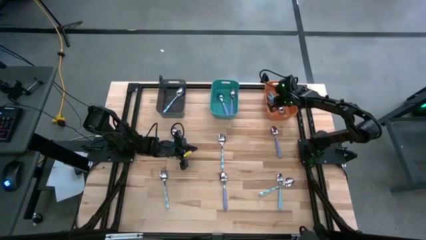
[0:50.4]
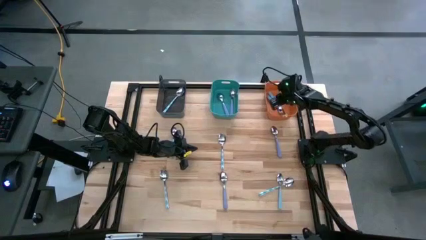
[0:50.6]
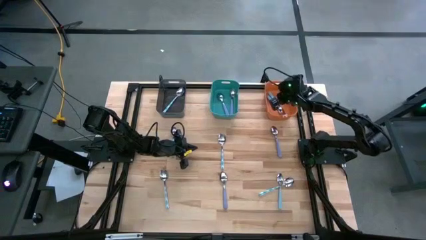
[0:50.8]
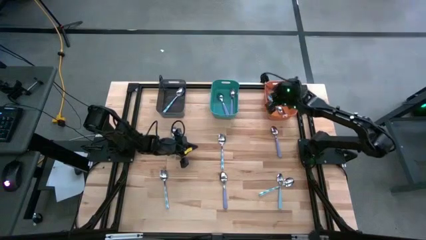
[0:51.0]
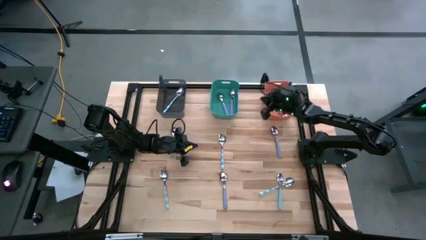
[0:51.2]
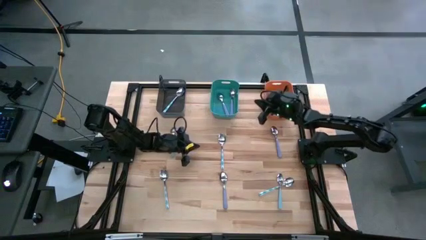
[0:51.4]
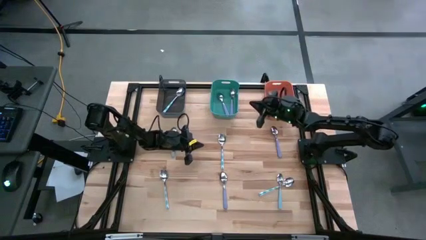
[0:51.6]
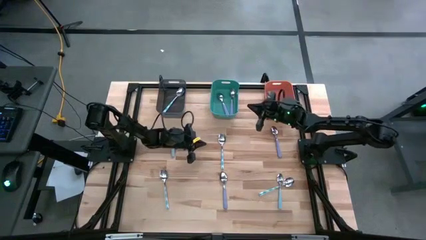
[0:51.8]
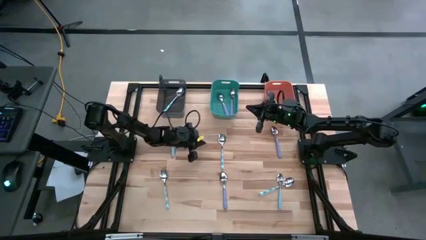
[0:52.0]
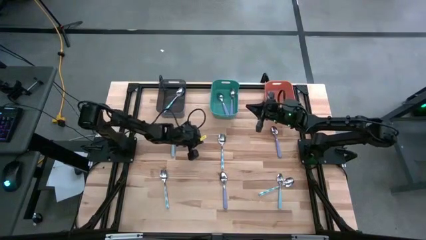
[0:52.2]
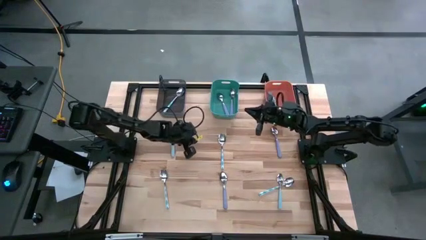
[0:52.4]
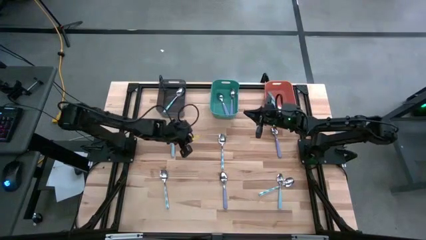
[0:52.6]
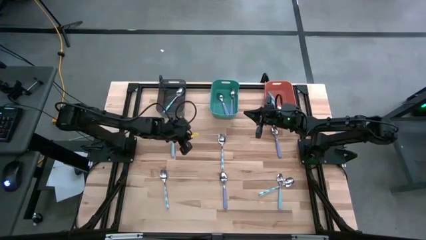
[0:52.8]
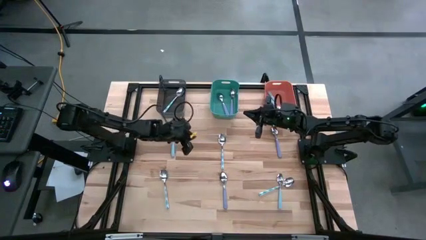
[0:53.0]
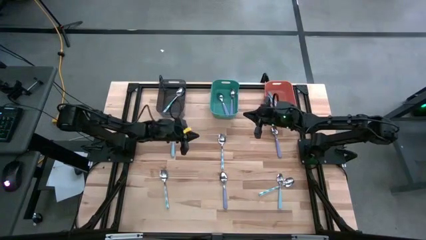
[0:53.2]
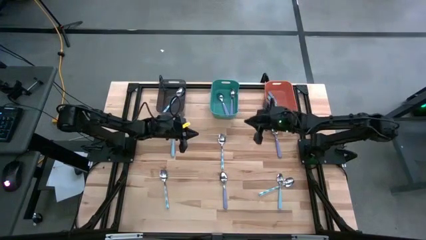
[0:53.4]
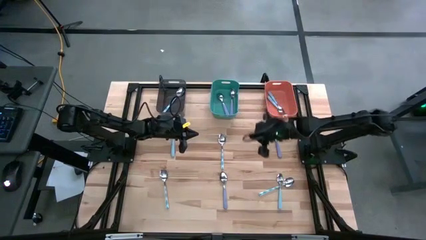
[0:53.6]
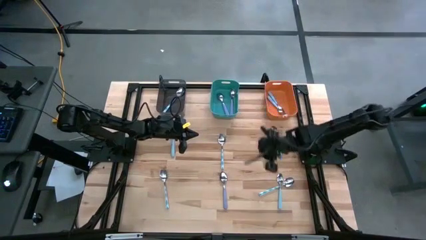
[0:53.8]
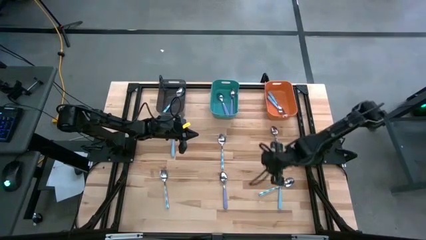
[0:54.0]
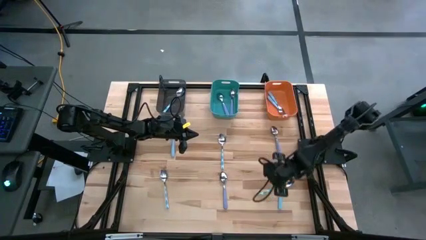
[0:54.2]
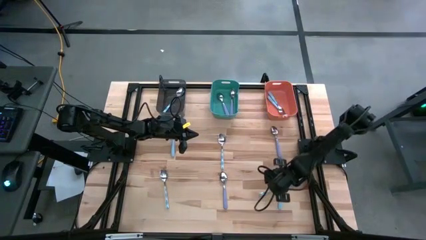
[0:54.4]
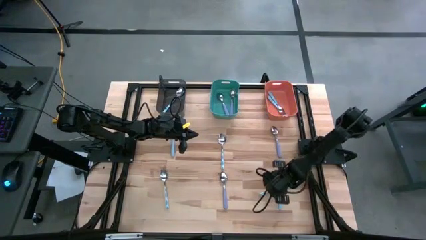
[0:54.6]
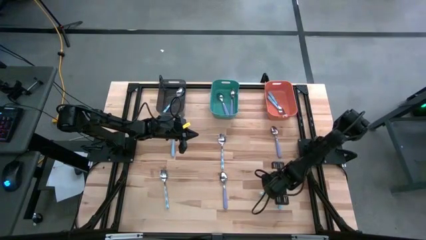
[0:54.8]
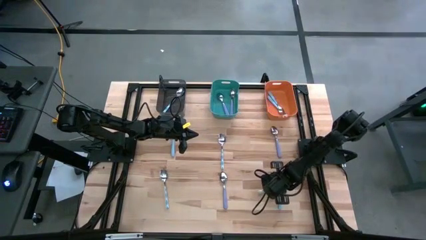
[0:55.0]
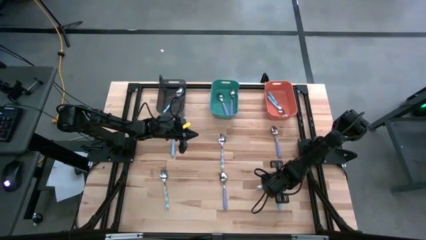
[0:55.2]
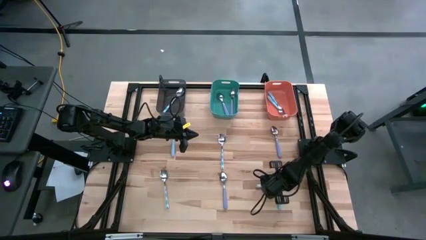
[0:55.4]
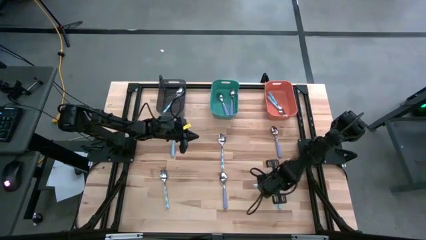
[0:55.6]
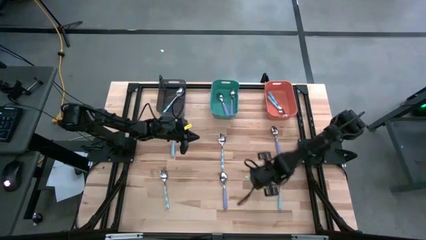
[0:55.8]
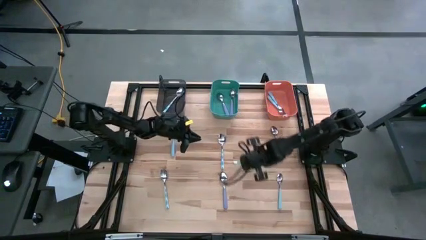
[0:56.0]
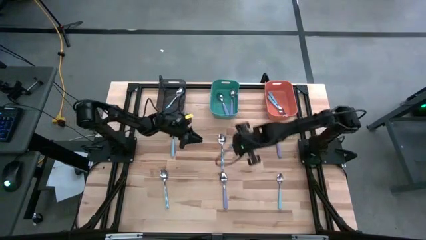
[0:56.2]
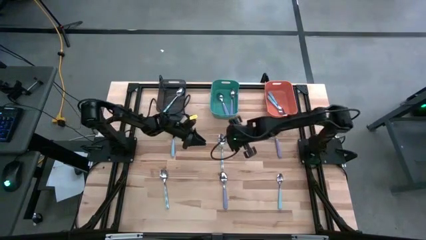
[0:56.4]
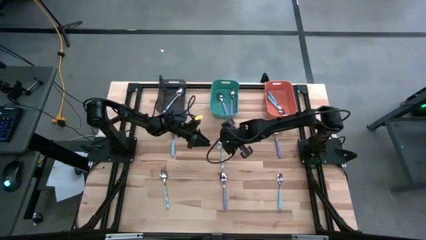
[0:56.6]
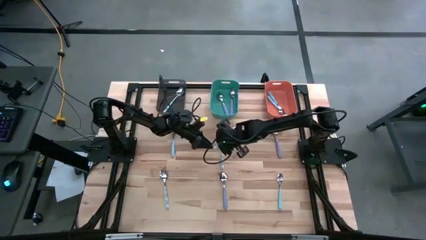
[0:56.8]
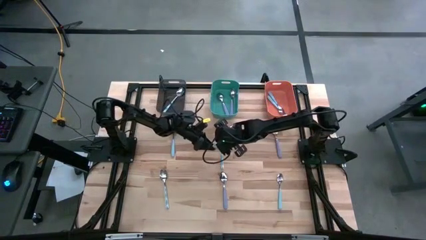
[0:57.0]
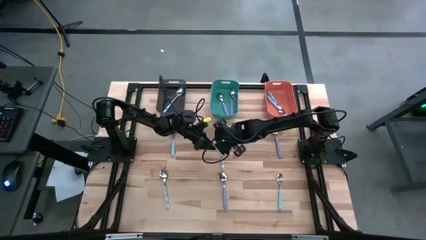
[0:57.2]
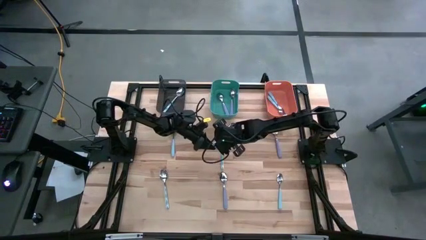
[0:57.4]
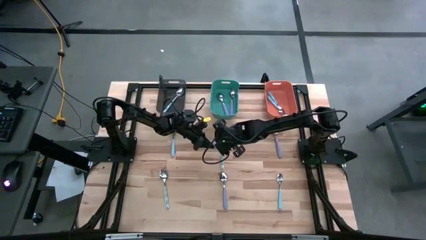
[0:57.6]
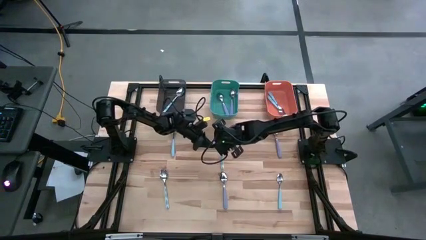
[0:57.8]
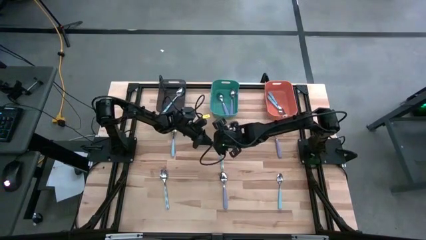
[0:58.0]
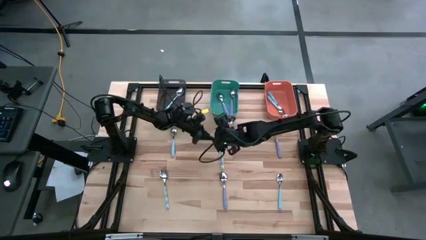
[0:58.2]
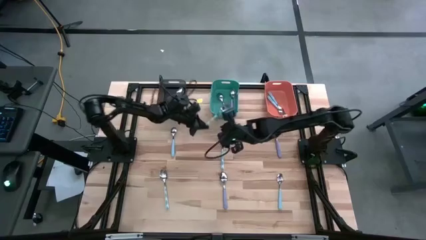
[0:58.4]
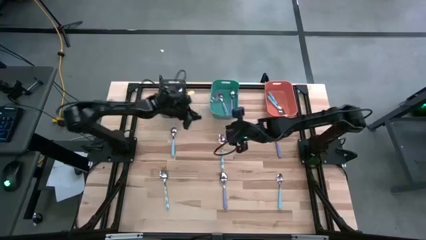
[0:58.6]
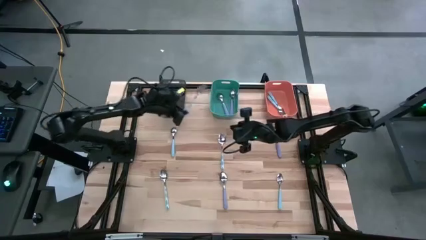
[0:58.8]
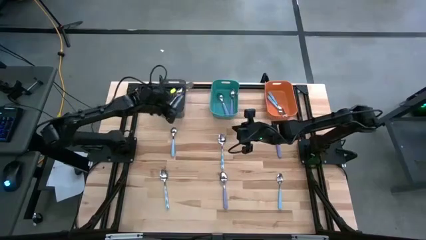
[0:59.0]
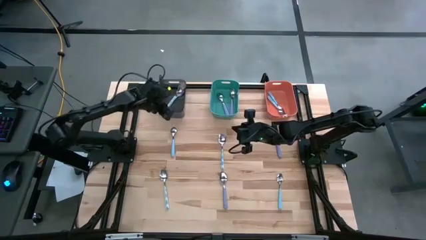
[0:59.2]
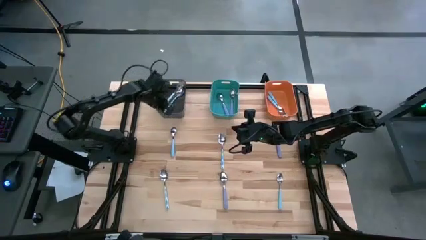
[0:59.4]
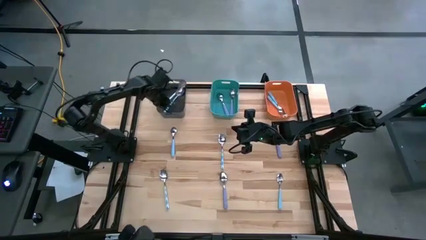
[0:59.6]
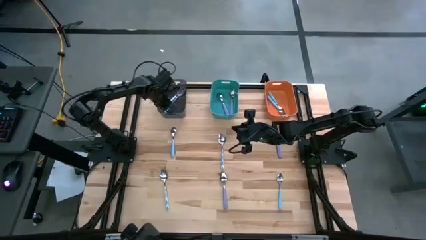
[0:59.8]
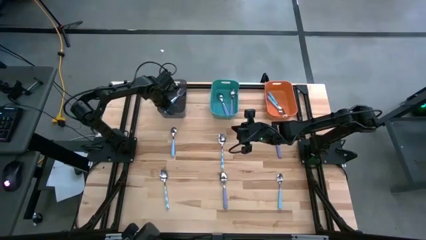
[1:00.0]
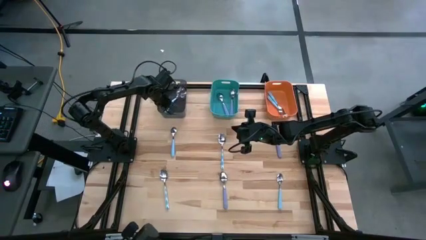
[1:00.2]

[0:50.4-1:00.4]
Task: Sort silverware by color (type)
Put the bottom right white spoon into the black bin

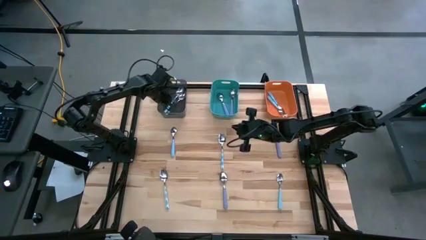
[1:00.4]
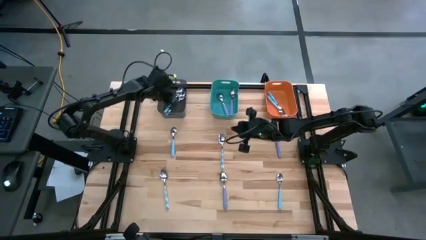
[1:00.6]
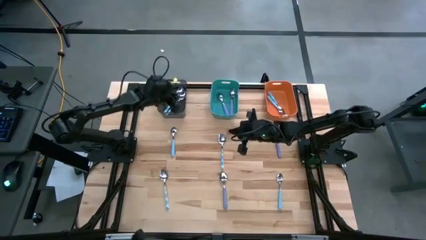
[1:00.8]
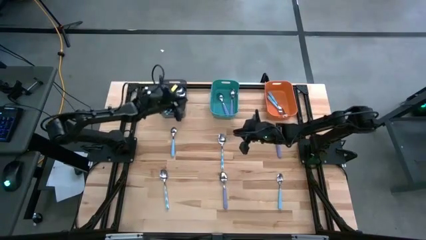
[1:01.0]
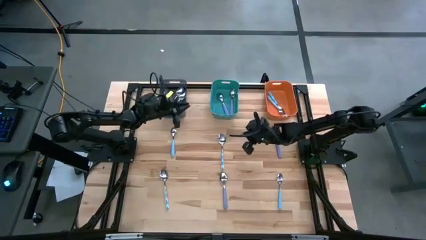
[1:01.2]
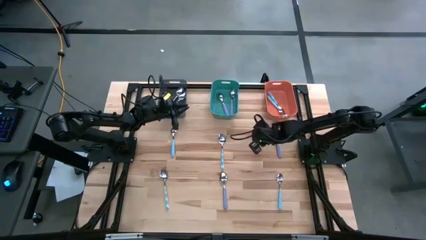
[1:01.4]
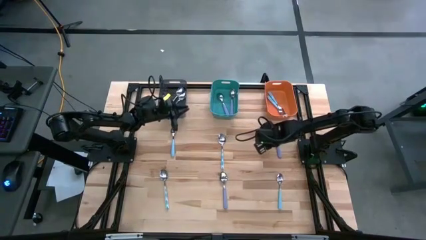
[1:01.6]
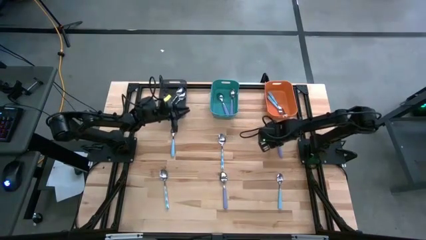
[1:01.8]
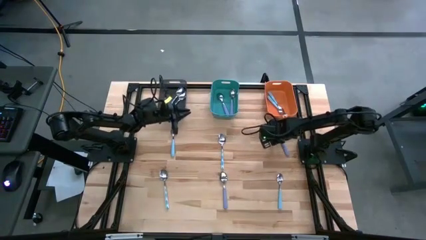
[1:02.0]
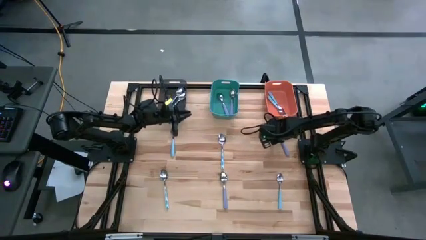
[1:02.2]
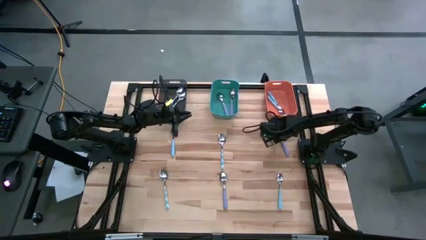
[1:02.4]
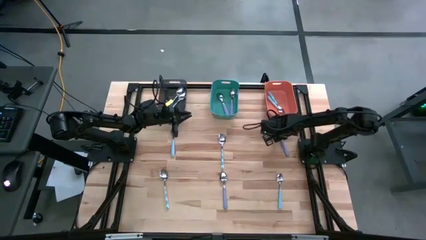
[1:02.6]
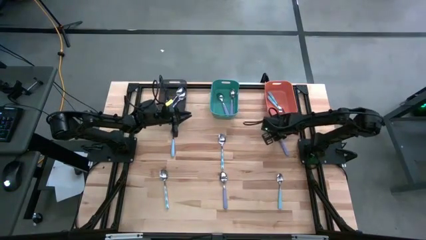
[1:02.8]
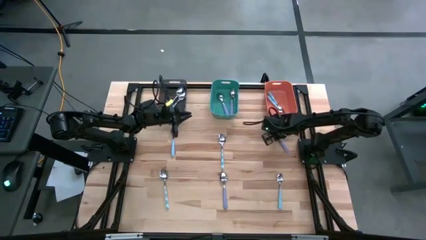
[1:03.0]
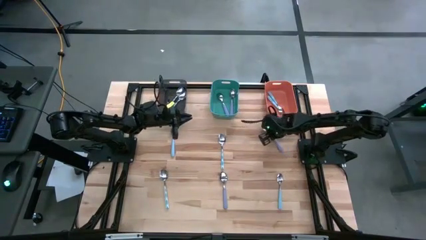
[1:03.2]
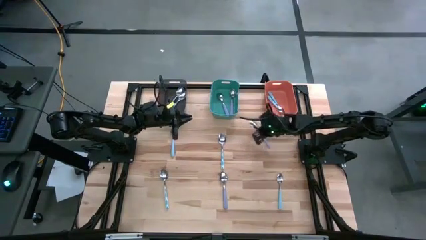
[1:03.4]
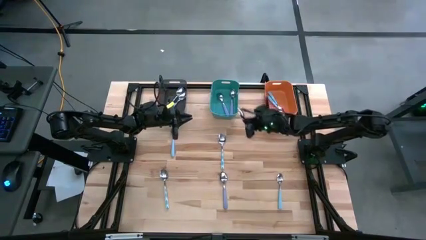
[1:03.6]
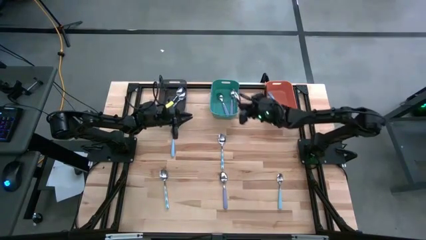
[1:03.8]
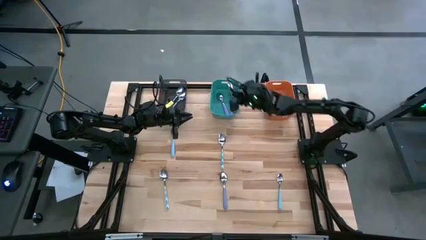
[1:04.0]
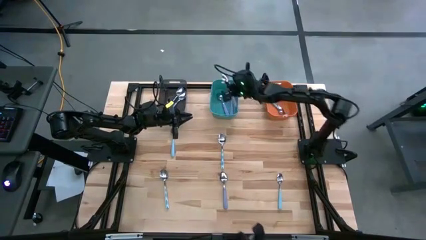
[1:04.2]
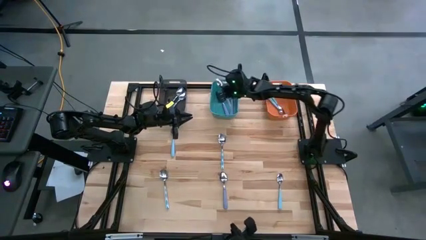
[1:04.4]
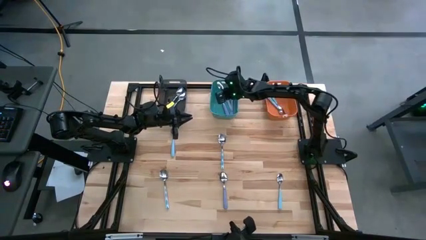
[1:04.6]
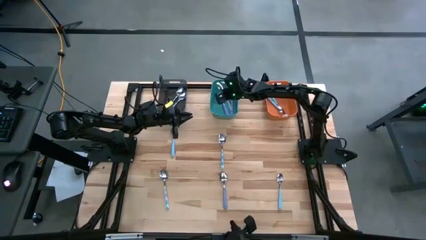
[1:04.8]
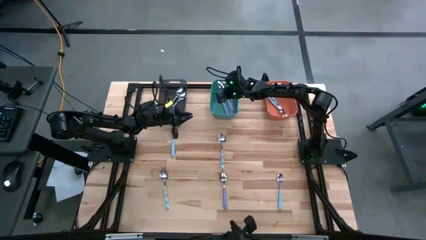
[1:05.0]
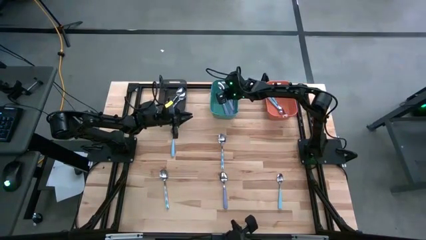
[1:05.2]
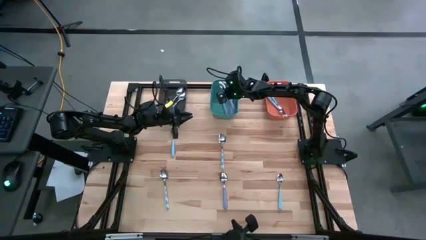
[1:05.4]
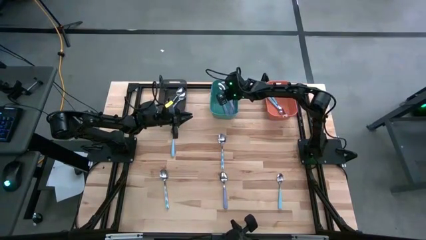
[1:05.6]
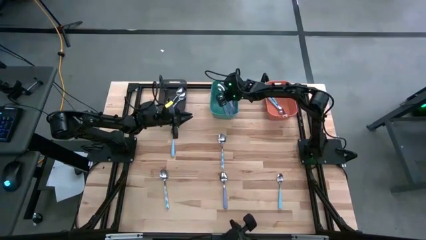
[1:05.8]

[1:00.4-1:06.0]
Put the top purple spoon into the green bin

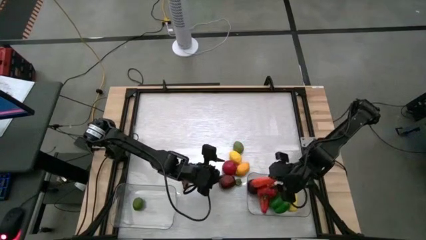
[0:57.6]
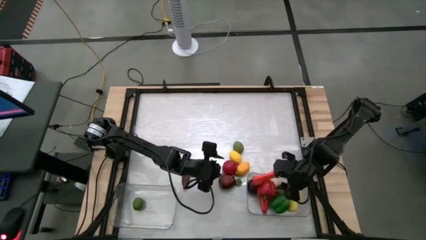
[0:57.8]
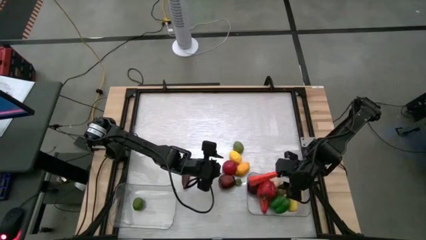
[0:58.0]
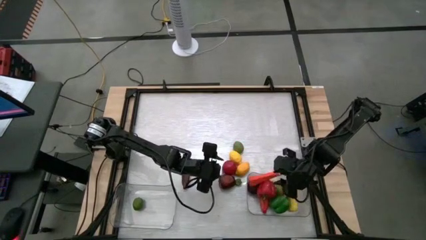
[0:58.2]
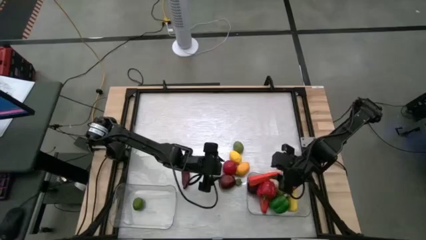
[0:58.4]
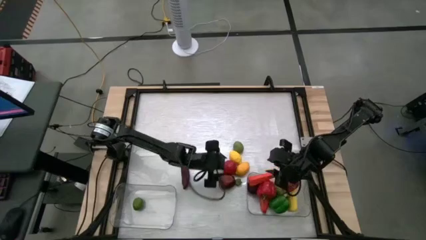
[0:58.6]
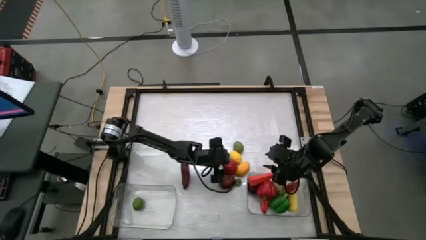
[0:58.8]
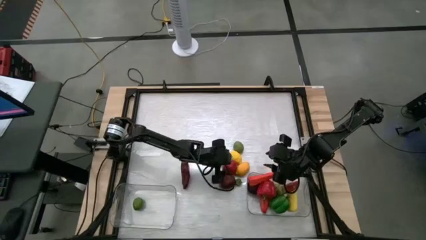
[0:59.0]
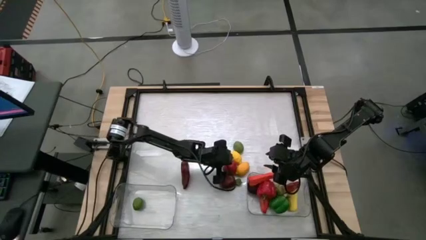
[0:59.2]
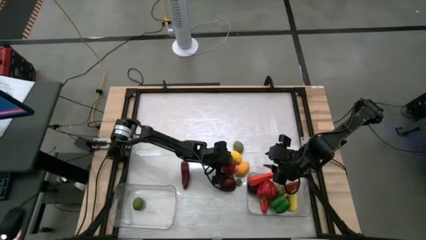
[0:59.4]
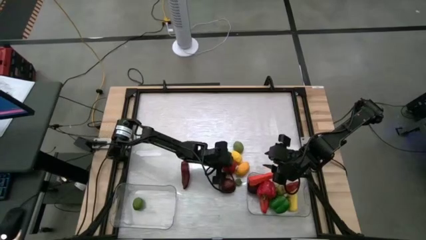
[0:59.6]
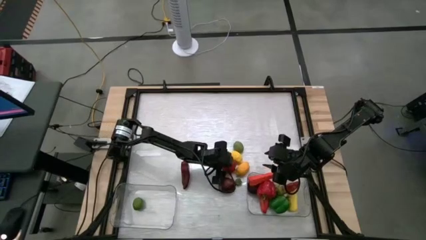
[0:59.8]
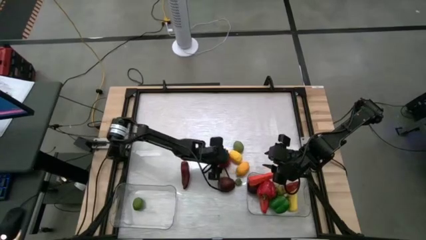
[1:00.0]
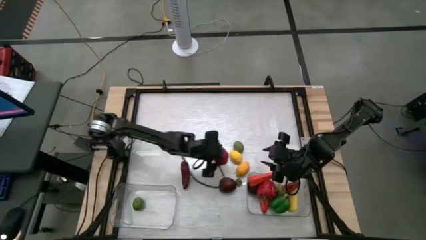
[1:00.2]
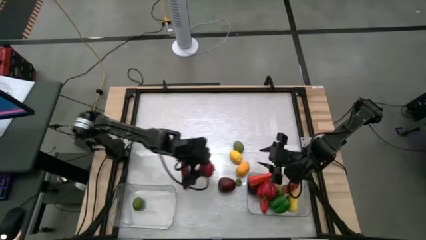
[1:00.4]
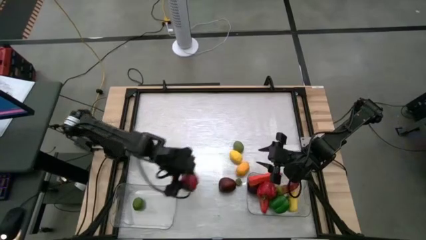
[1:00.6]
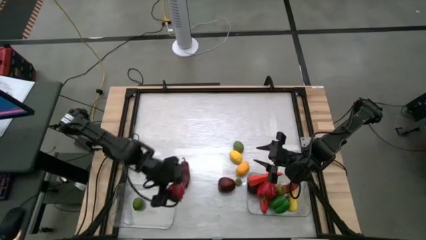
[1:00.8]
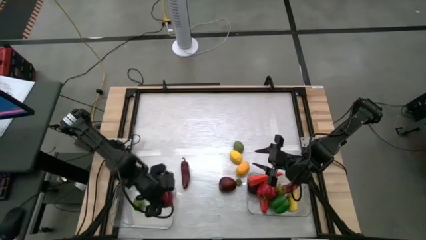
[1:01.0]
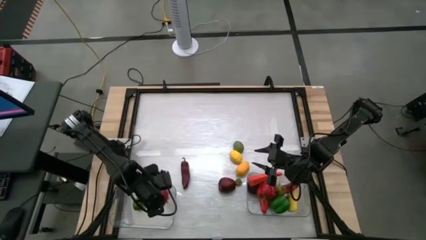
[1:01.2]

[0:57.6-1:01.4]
Task: Sort produce into baskets
Put the tomato into the left transparent bin
